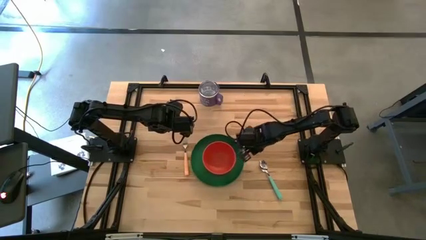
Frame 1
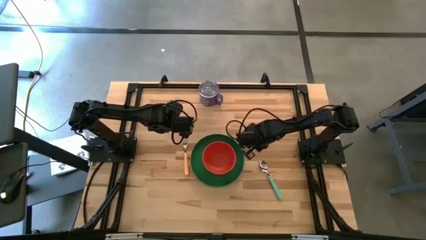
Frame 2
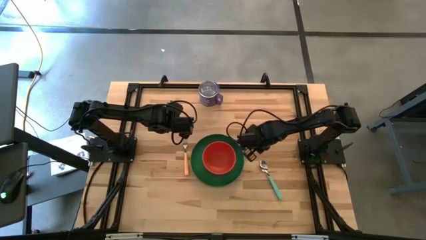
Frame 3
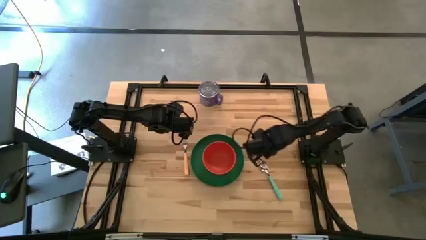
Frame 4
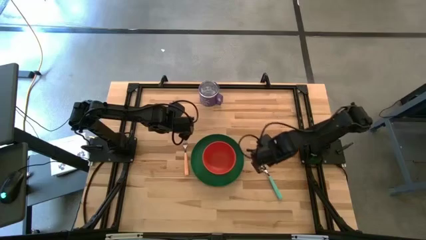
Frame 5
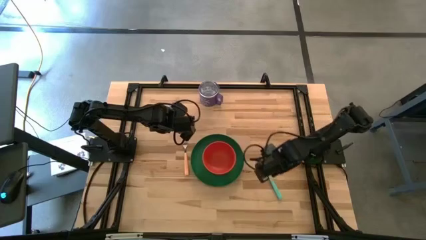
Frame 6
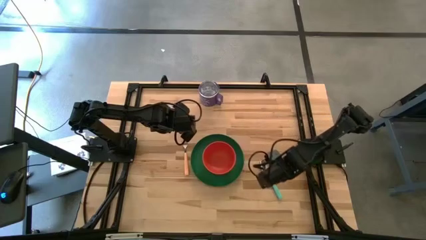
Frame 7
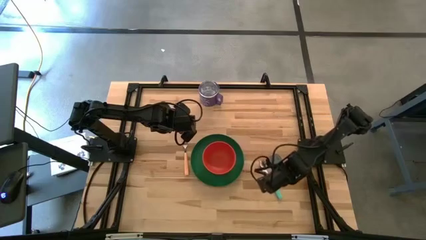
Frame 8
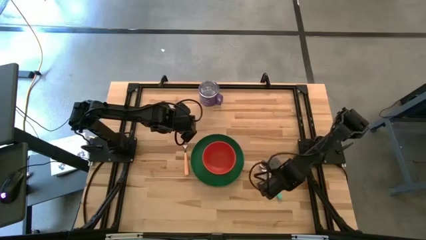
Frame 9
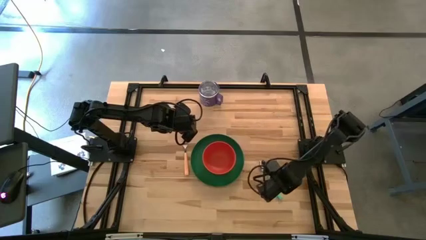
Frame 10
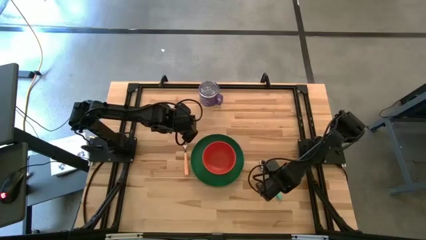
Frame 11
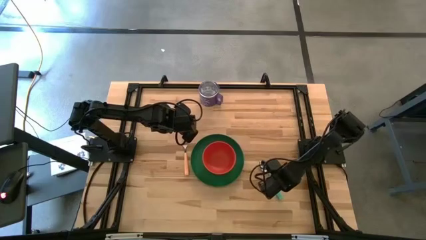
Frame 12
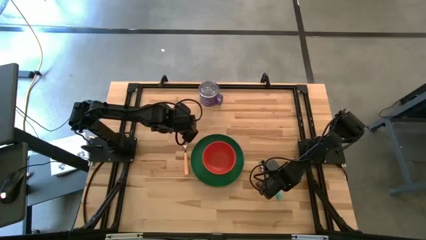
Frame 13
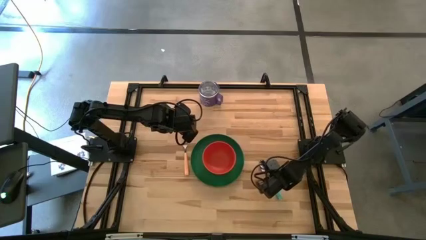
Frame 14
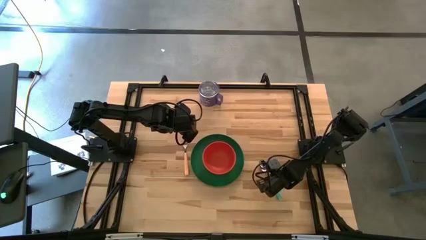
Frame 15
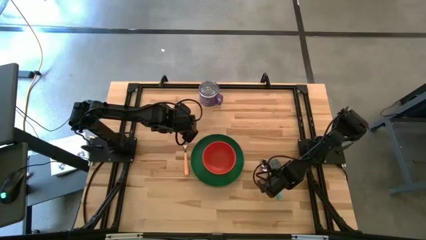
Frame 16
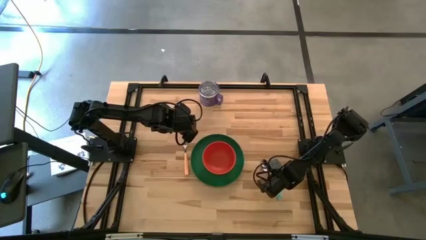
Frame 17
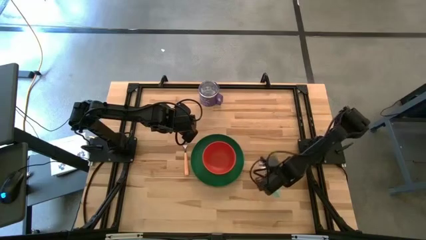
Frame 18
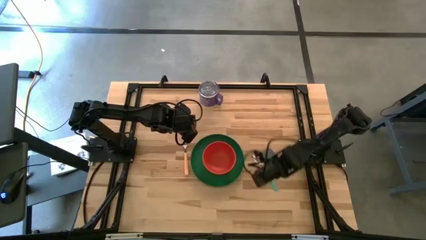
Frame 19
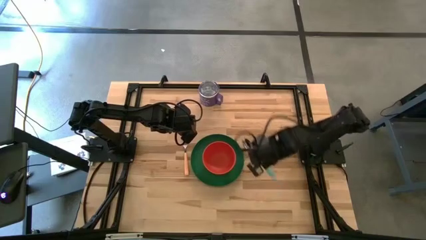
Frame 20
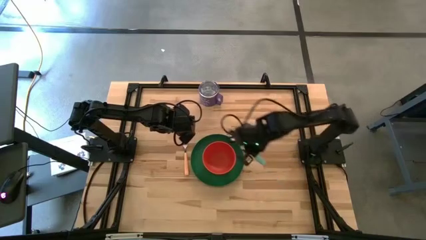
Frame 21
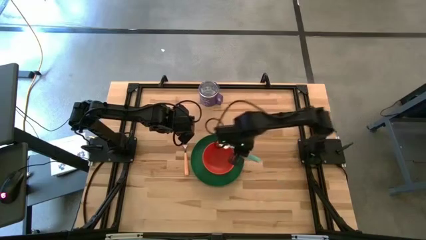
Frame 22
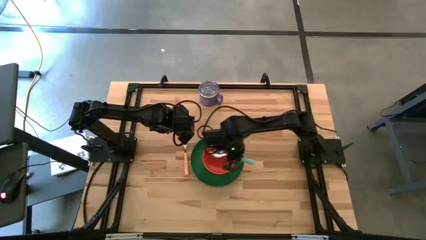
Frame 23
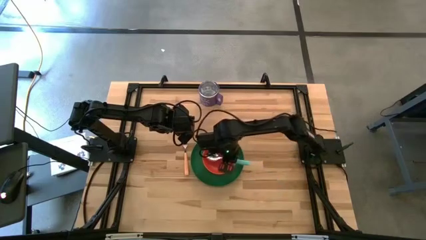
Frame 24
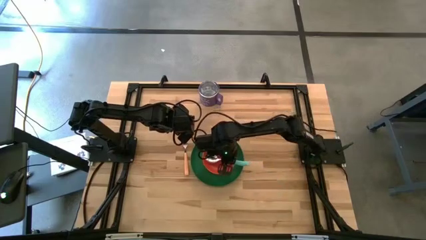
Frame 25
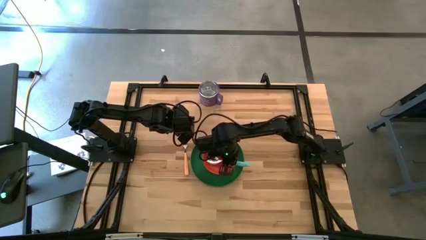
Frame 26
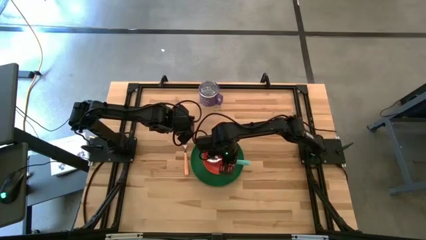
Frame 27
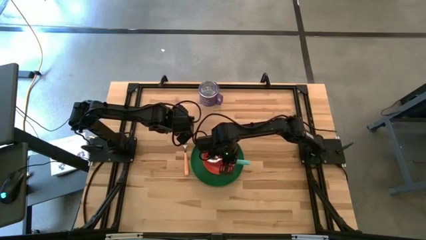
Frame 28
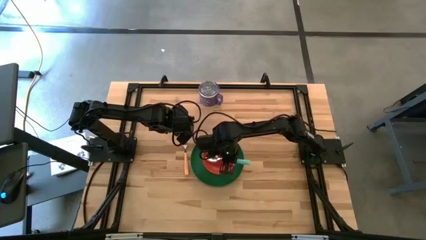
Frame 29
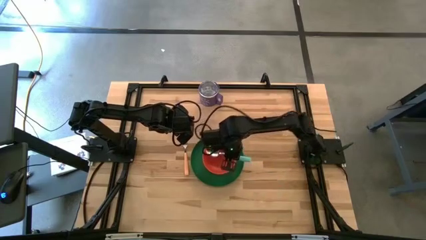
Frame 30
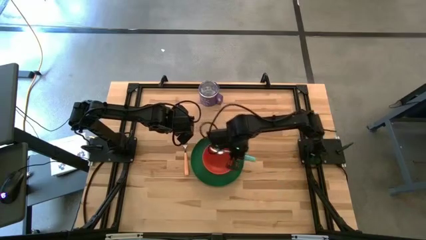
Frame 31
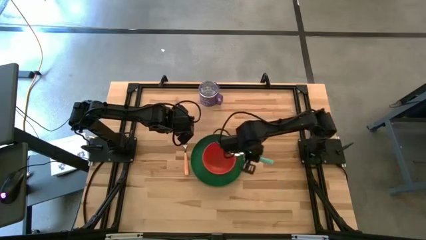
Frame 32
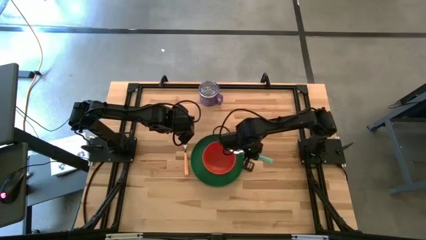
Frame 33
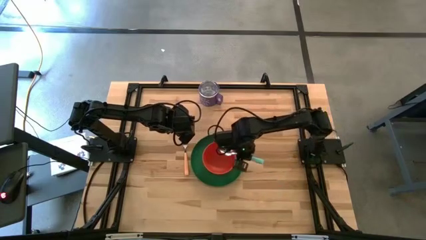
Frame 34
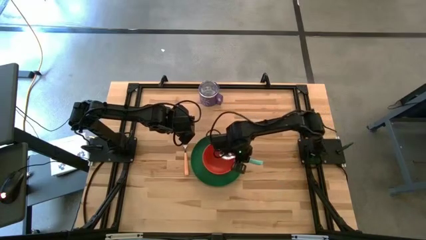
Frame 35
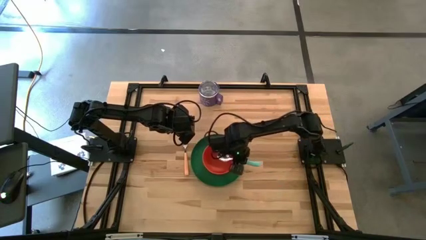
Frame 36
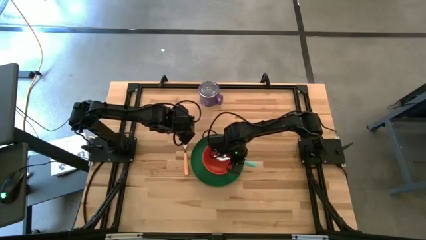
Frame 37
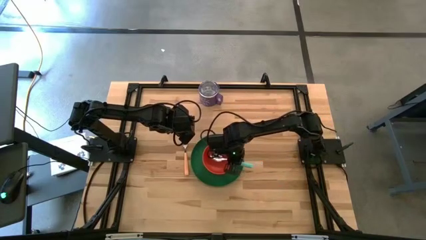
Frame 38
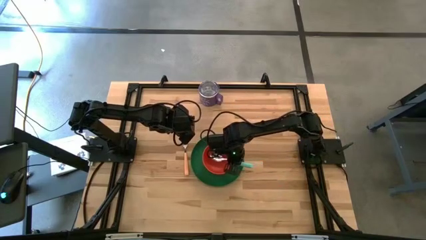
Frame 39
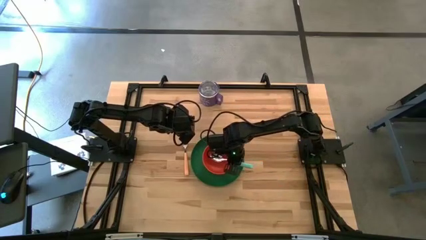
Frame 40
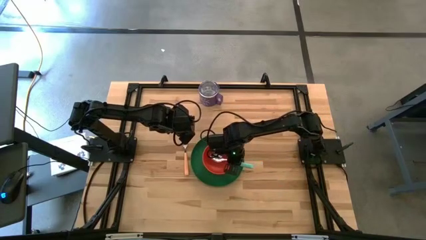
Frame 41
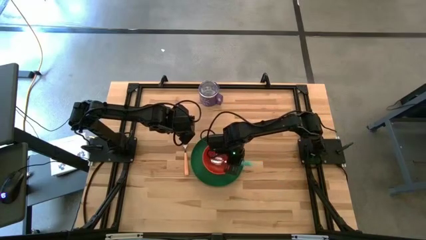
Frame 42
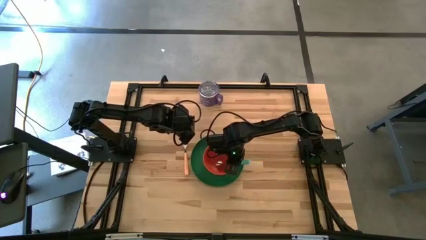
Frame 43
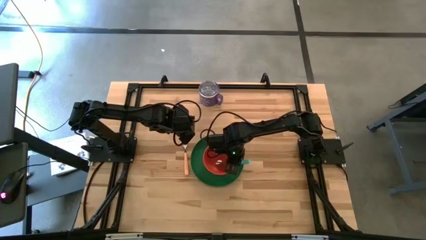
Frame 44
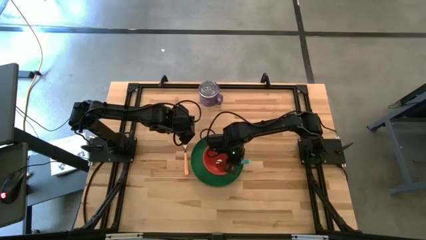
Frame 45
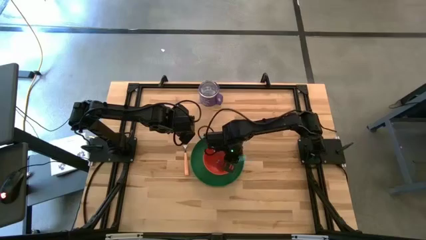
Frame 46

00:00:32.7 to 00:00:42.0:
Task: Set table place
Put the blue spoon into the orange bowl on the green plate

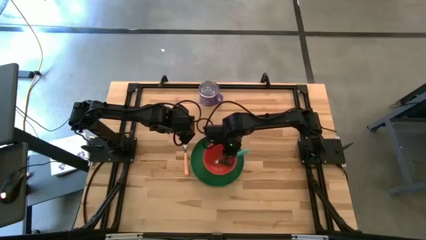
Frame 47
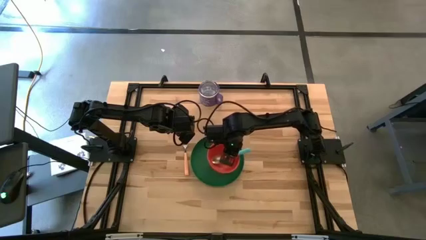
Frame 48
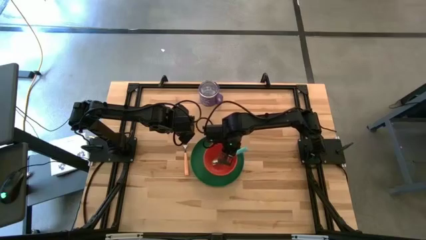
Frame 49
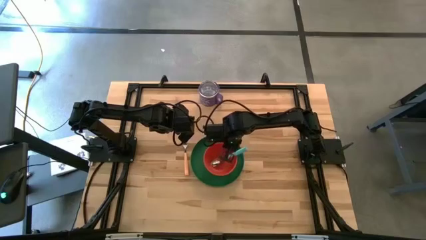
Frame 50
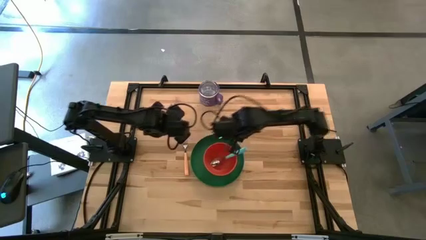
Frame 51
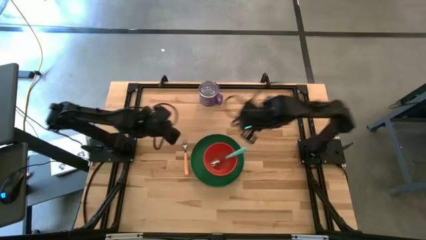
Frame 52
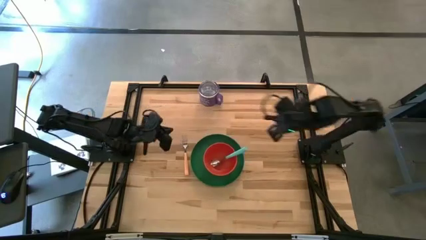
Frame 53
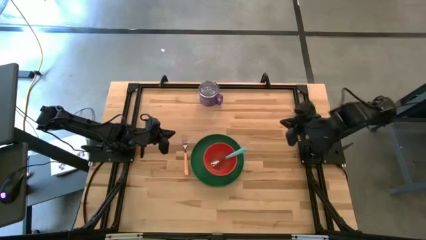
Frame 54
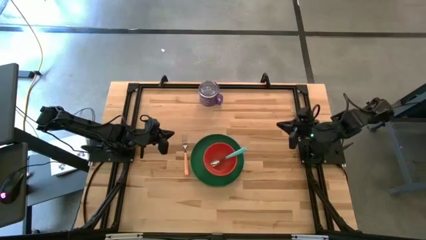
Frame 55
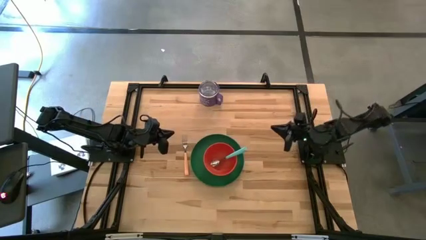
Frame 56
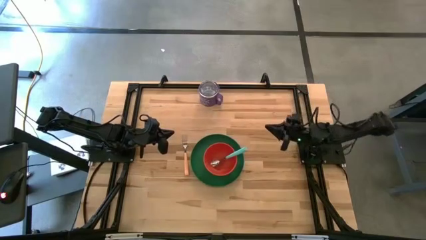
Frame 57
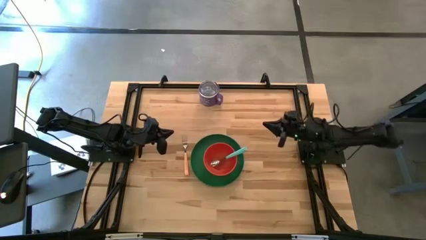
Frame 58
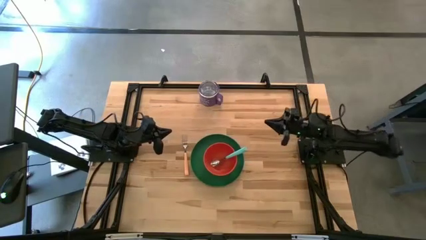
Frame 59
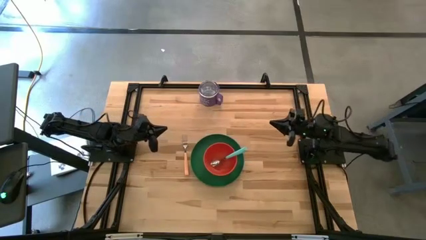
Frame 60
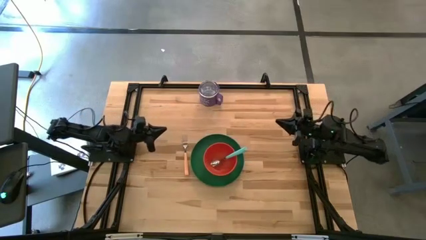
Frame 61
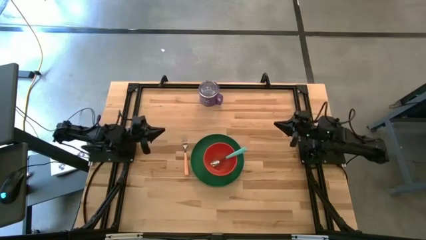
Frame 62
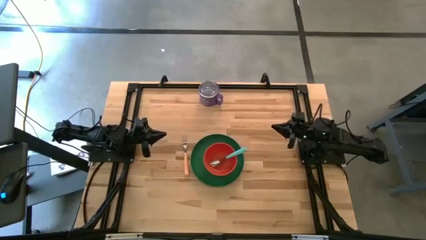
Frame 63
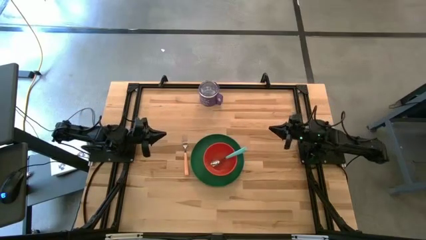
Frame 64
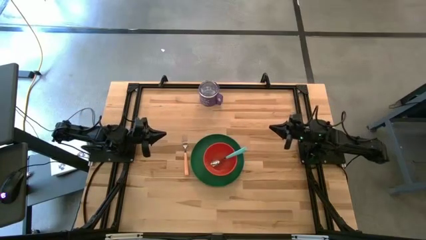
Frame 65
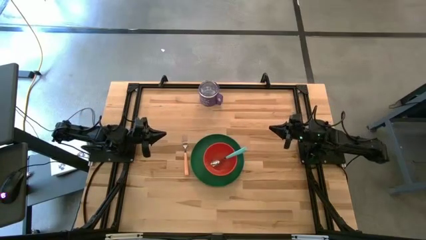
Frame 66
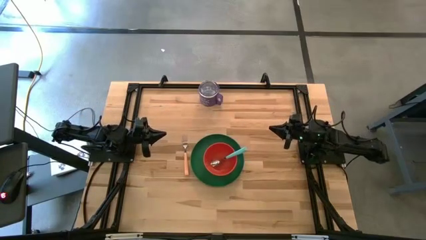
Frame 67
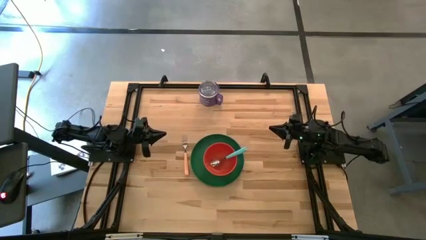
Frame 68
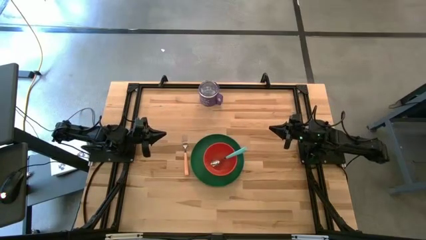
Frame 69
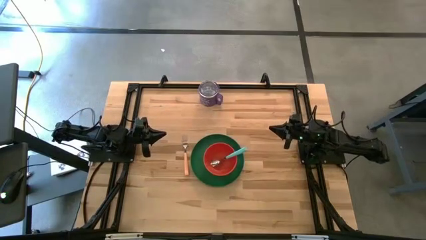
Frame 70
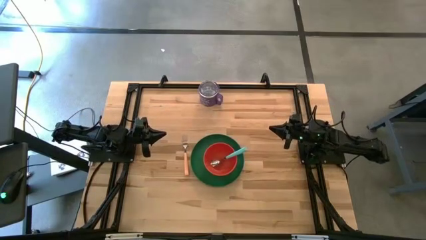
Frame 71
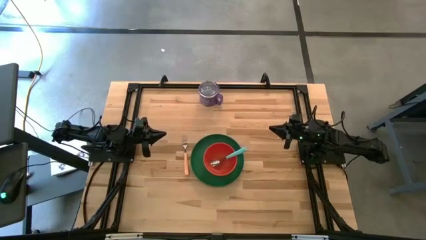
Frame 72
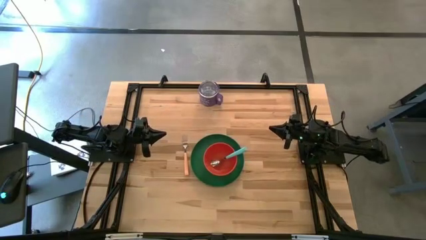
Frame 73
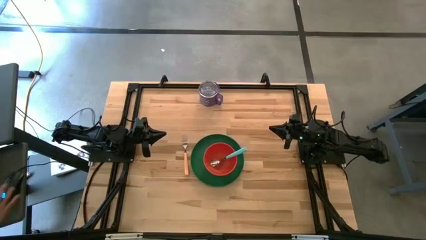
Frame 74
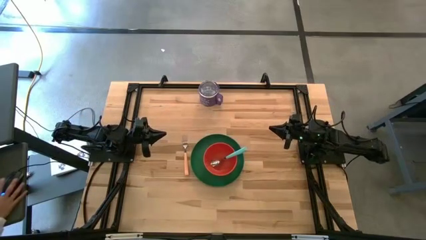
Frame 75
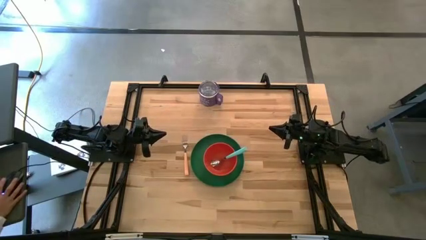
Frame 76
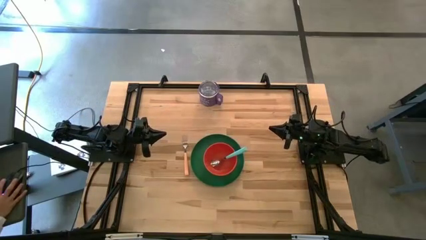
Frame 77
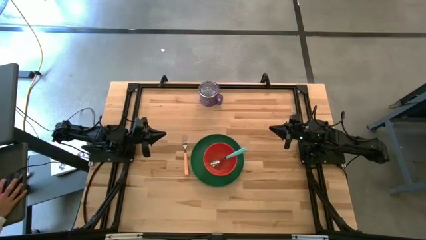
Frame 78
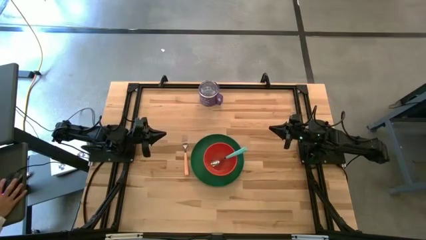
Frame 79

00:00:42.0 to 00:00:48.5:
Return to Home Position
